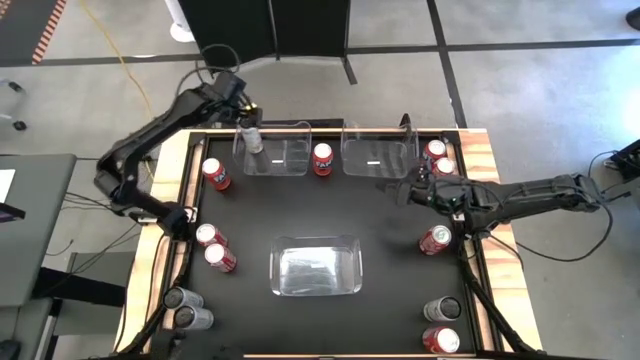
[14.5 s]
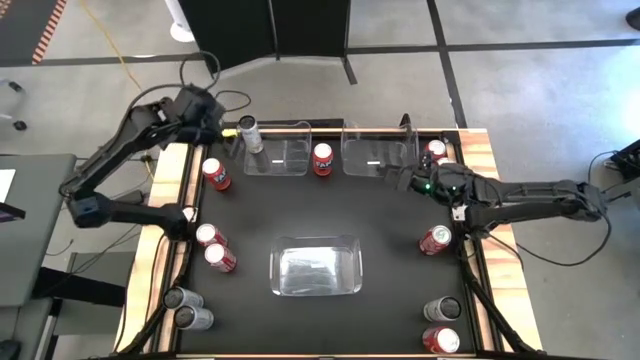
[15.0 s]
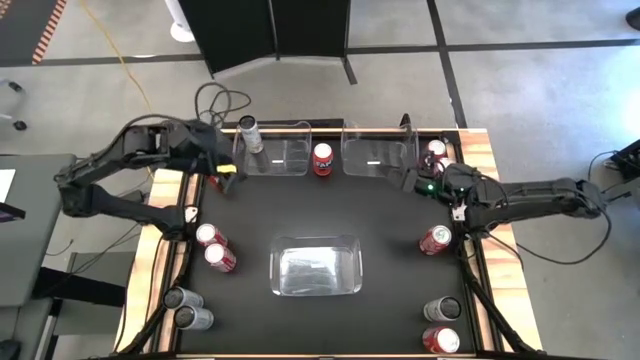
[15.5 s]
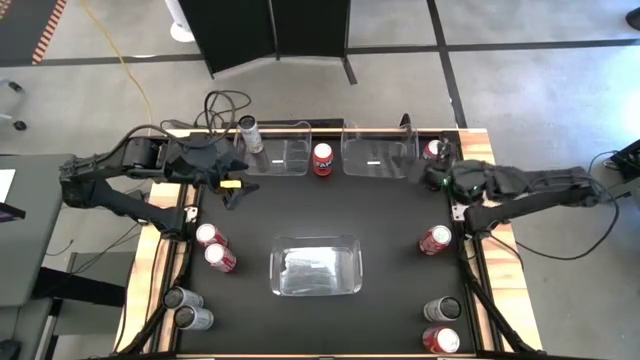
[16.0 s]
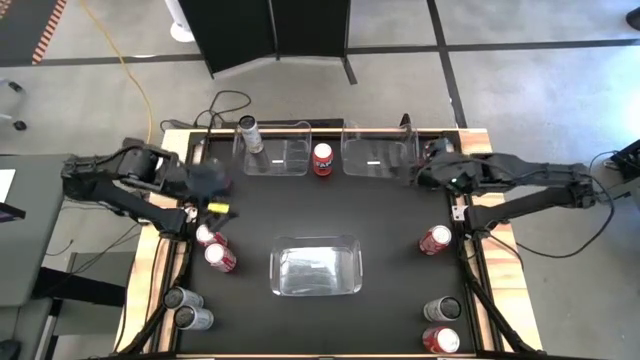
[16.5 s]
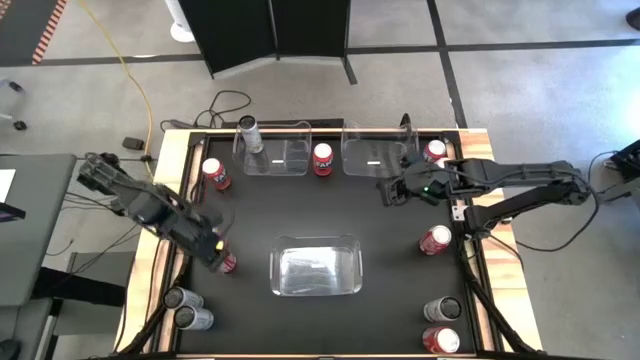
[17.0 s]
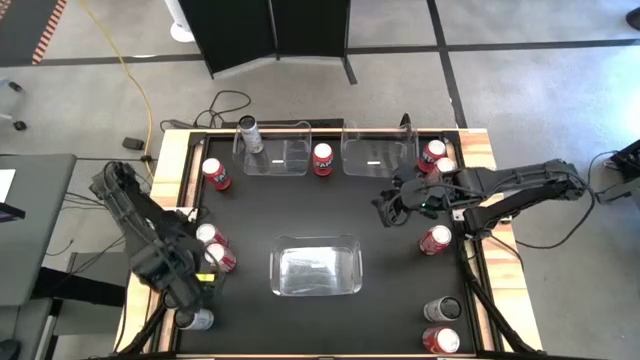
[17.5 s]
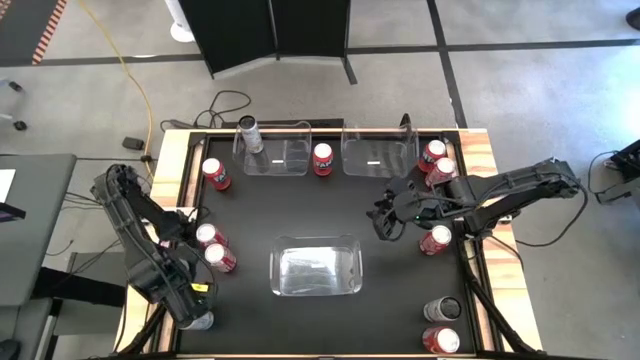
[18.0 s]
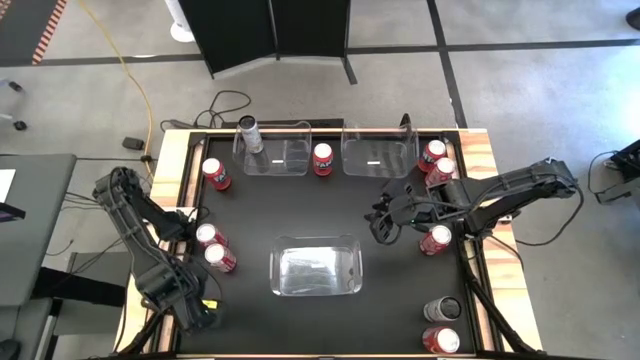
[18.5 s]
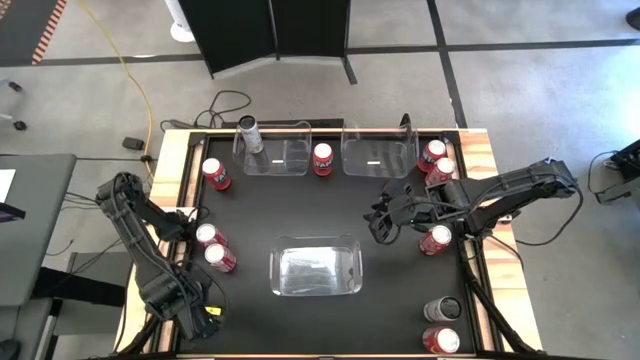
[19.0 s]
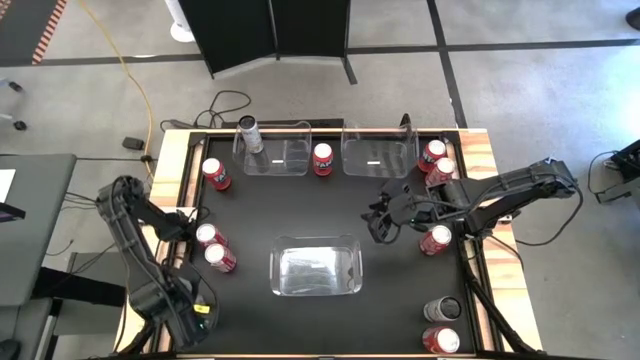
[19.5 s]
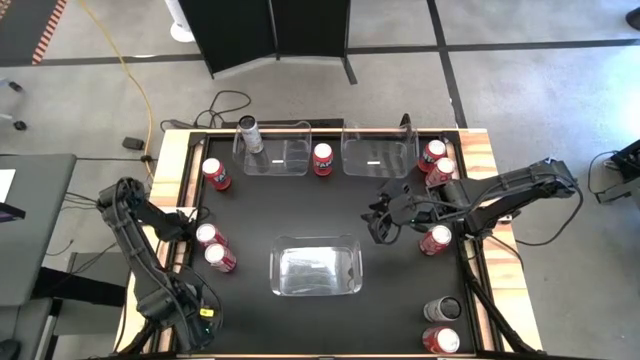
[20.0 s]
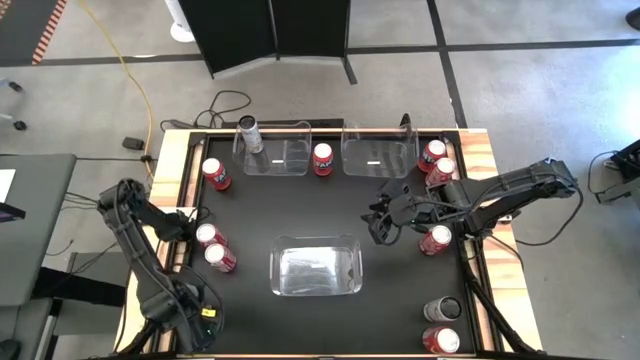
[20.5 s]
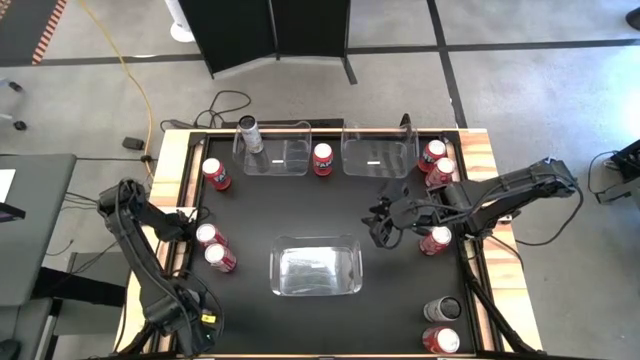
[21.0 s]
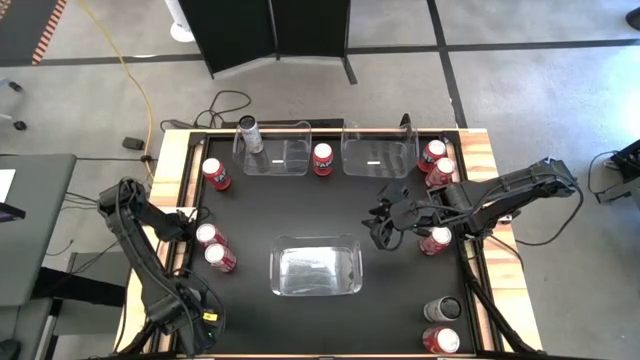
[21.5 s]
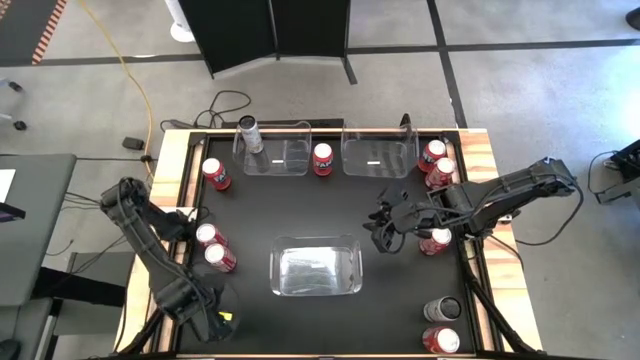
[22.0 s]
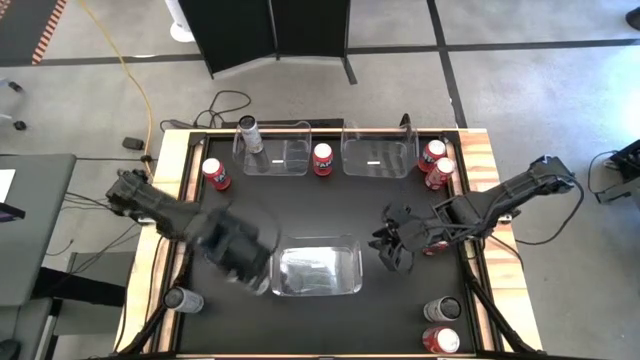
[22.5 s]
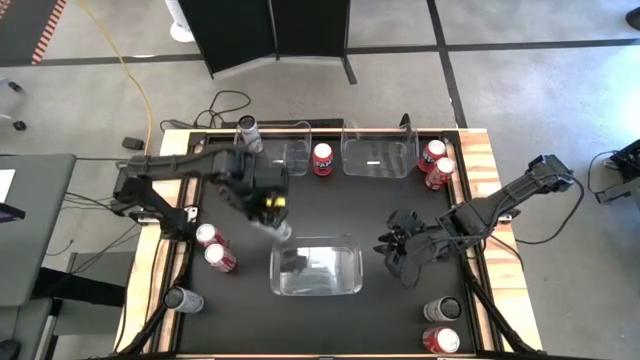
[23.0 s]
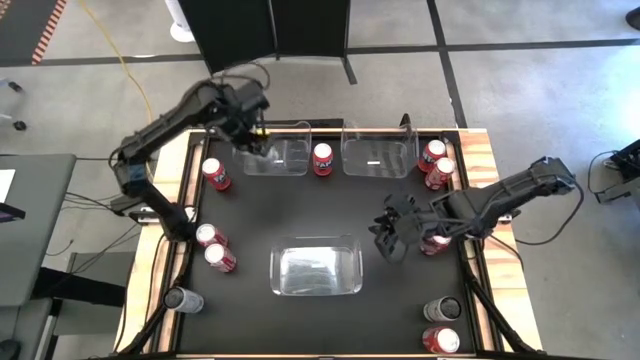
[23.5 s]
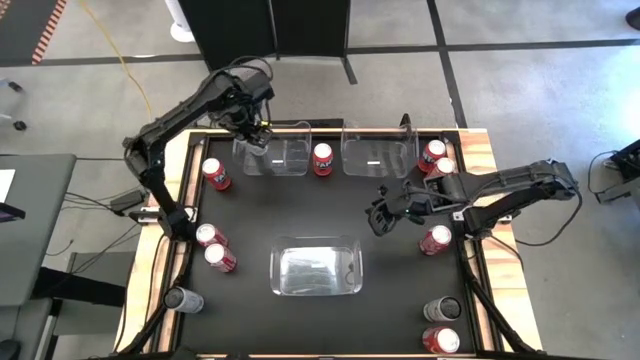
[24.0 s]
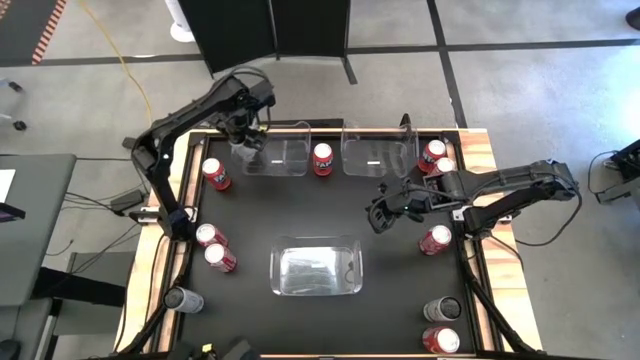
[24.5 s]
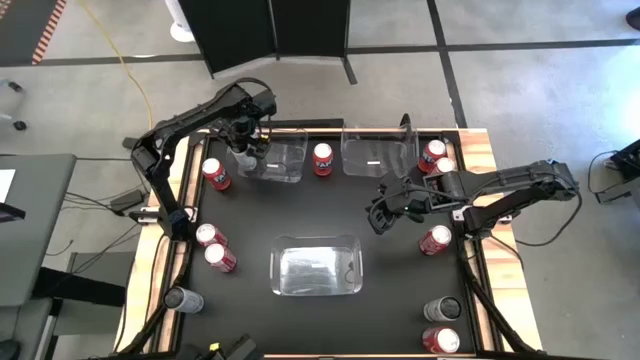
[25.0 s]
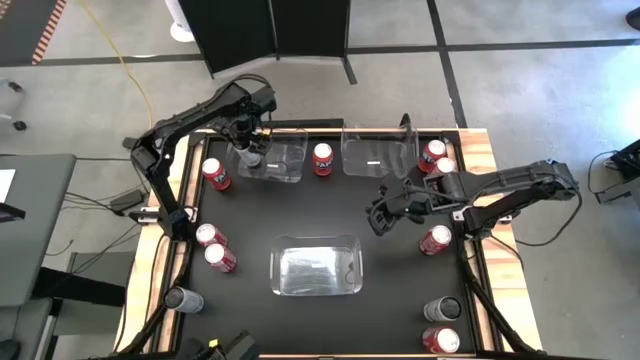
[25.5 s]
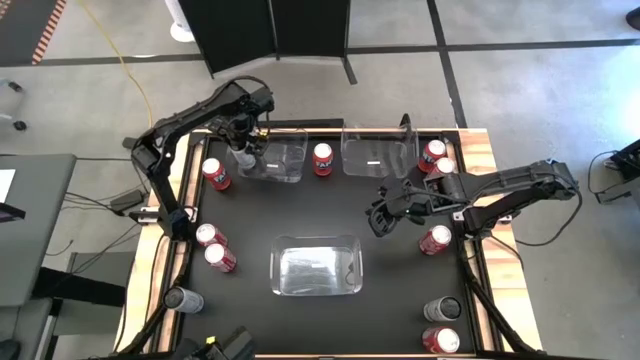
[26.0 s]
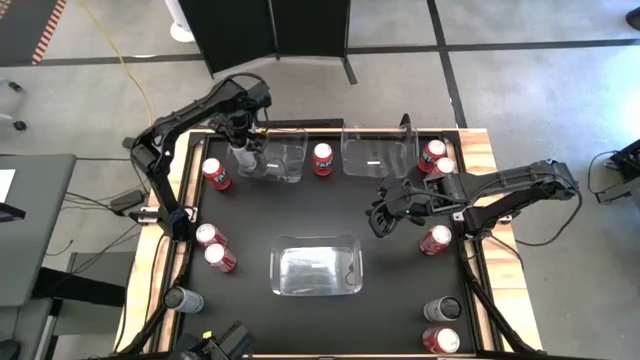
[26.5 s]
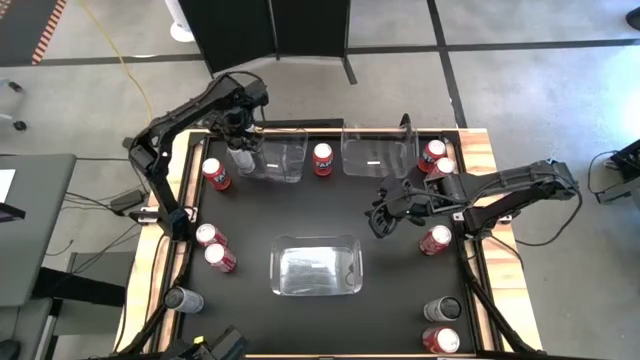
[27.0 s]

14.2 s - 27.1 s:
Task: Sort soda cans
Put the bottom white-yellow soda can into the top left transparent bin

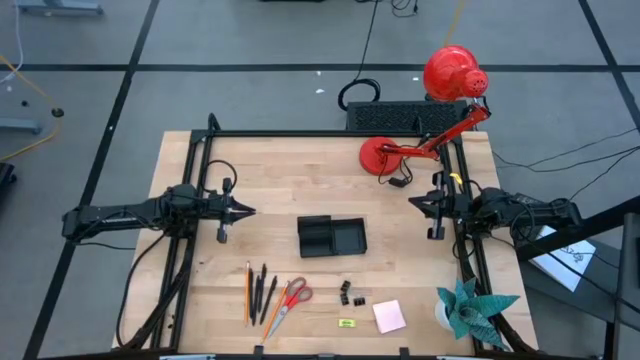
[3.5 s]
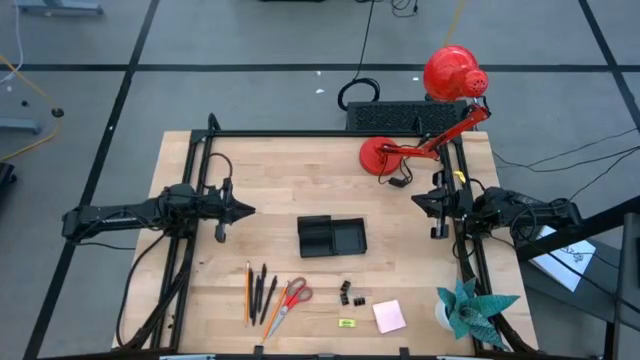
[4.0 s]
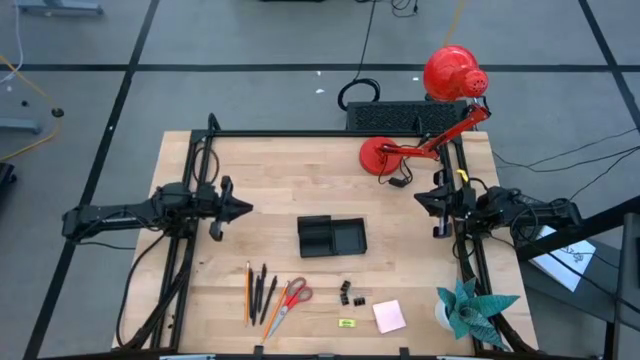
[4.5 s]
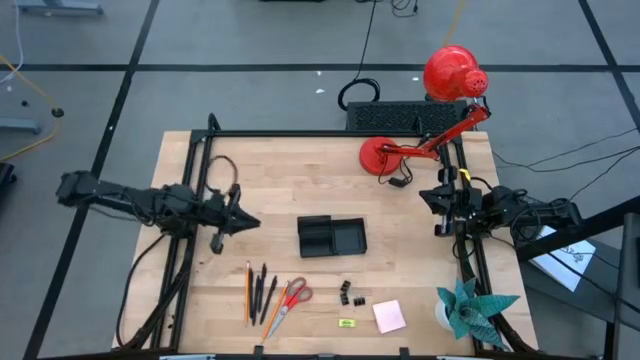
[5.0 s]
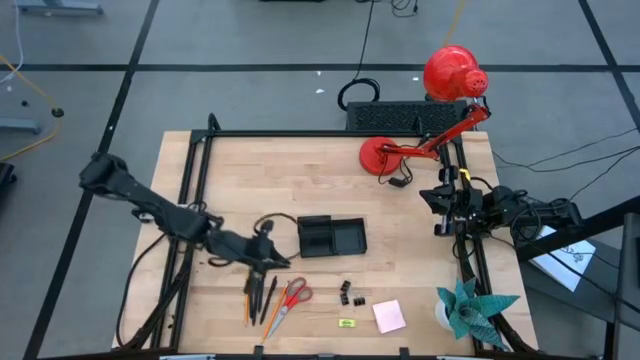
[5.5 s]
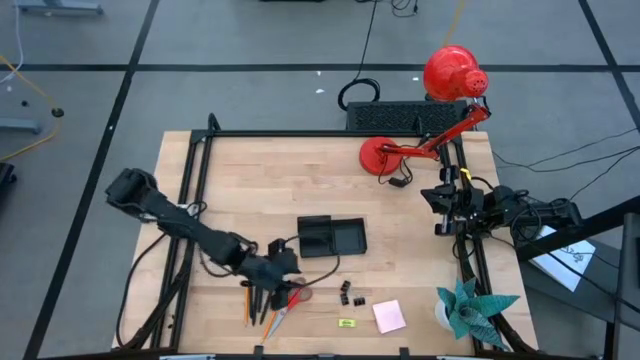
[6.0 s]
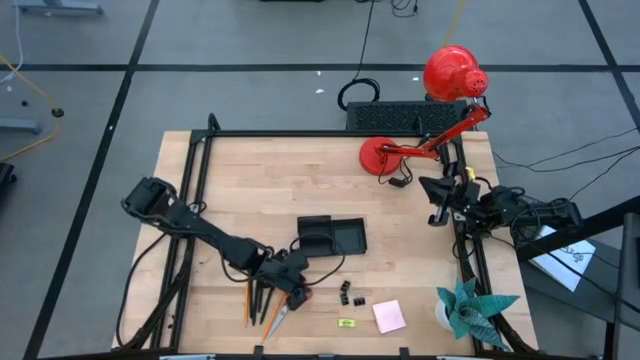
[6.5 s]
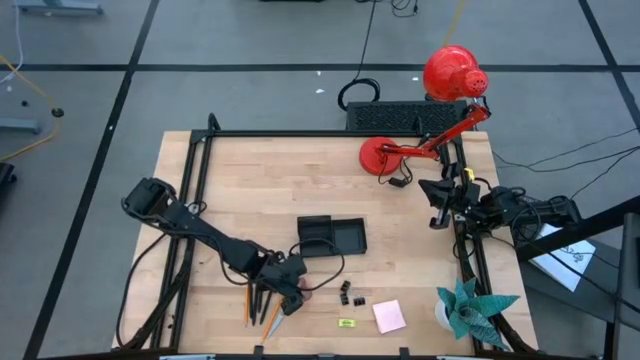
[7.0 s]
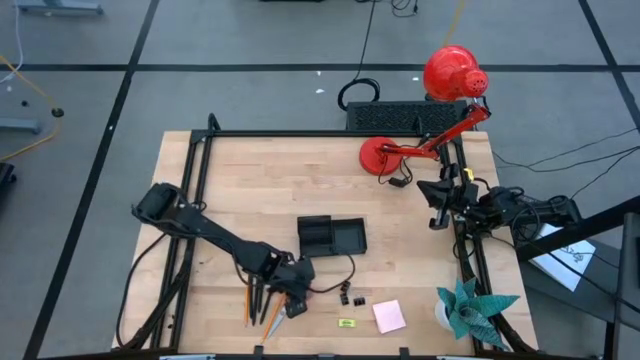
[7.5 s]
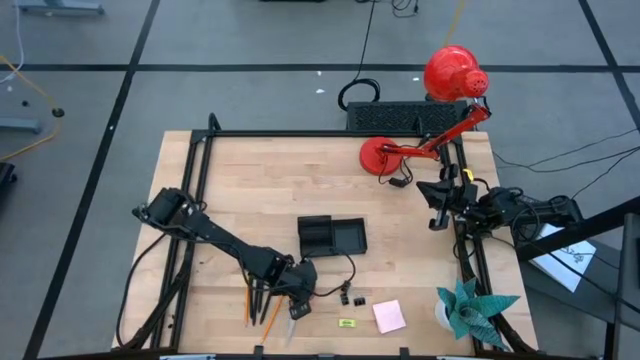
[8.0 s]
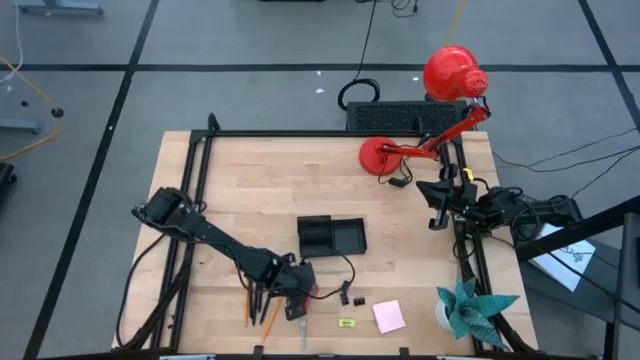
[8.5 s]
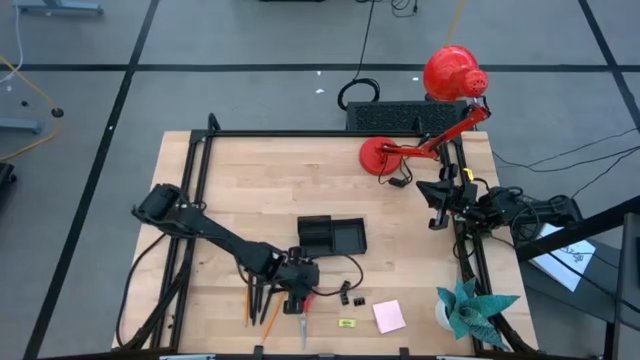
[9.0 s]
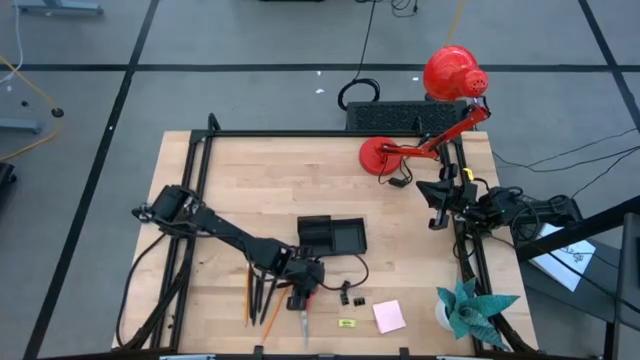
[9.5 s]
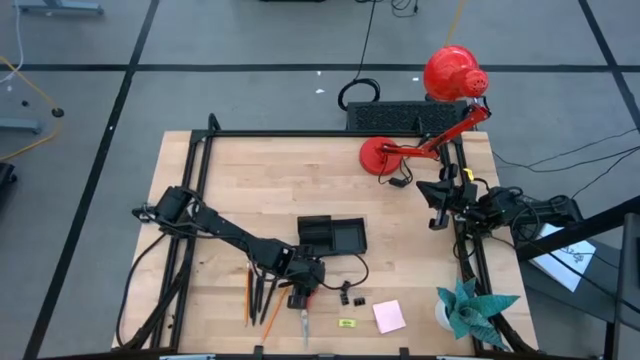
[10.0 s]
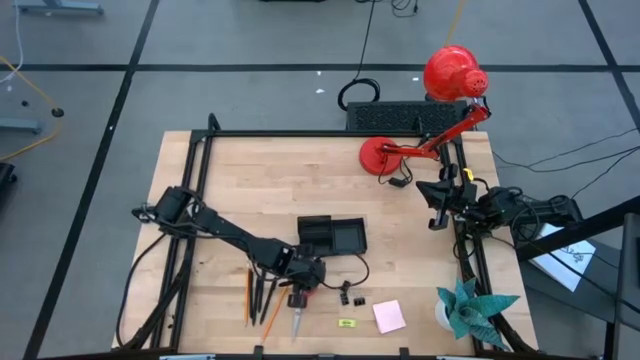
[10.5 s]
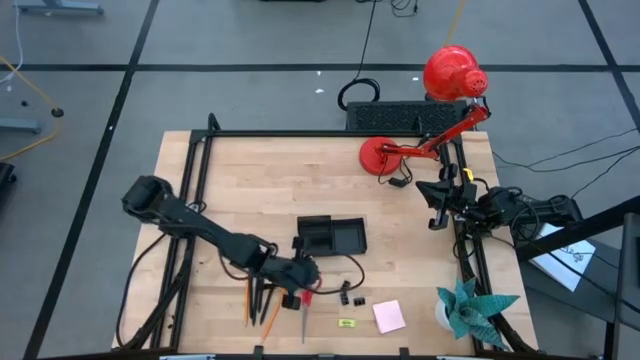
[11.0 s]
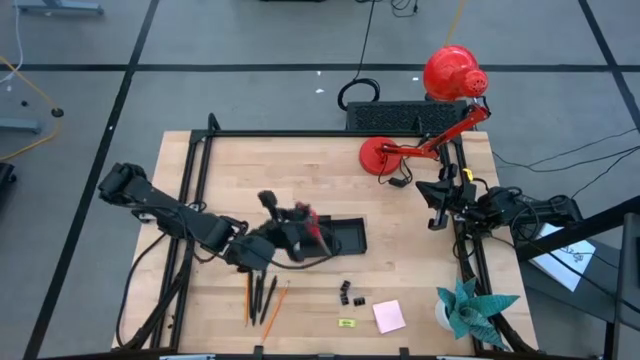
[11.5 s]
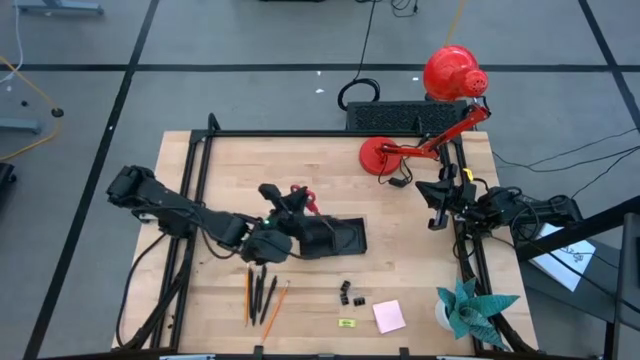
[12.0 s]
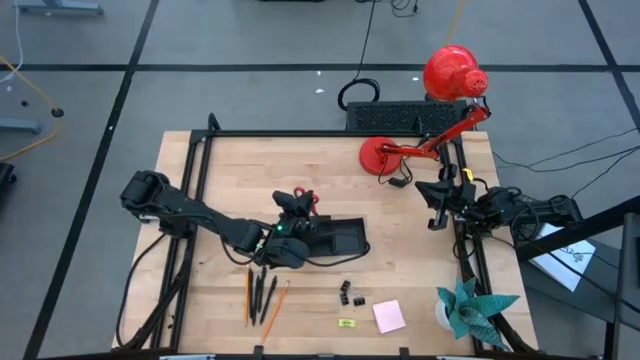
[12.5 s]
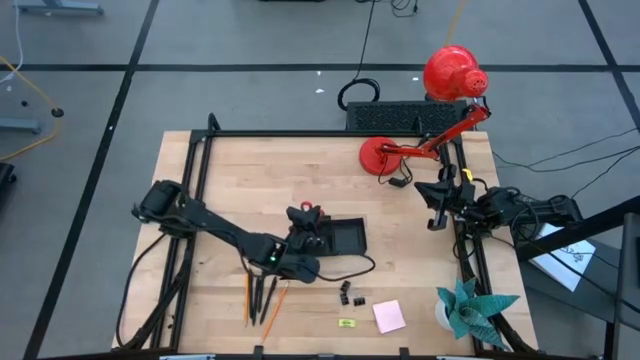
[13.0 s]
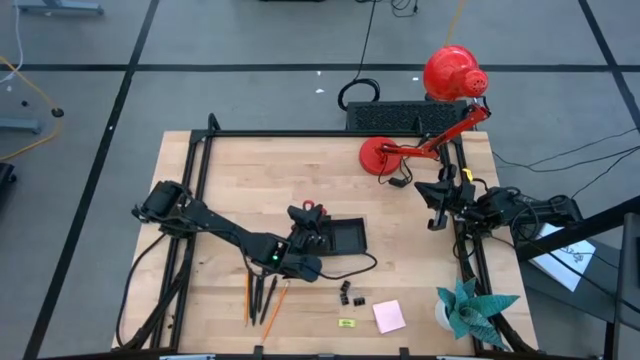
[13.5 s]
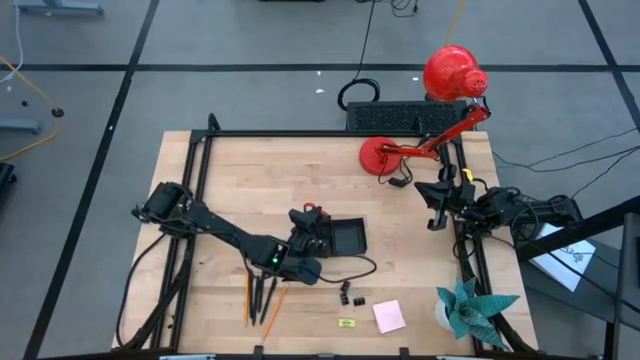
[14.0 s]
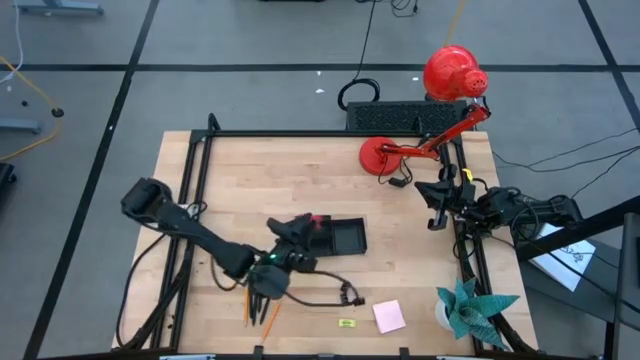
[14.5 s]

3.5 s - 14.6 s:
Task: Pick and place office supplies into organizer
Put the scissors into the top left compartment of the desk organizer
